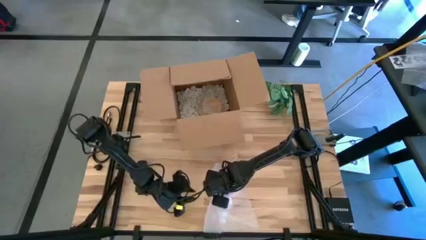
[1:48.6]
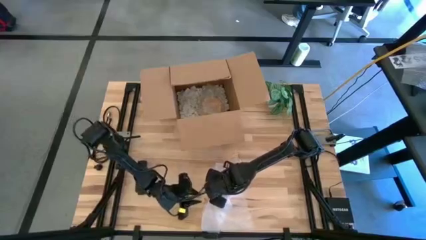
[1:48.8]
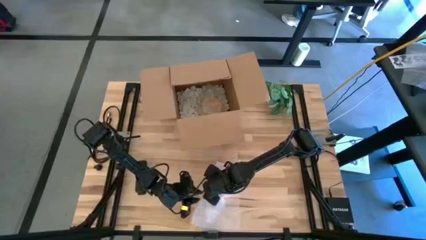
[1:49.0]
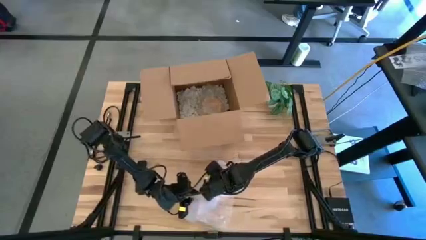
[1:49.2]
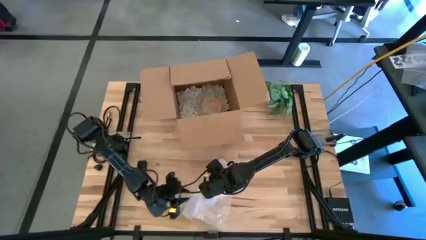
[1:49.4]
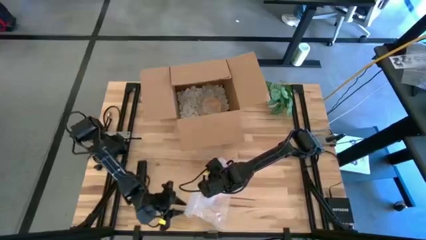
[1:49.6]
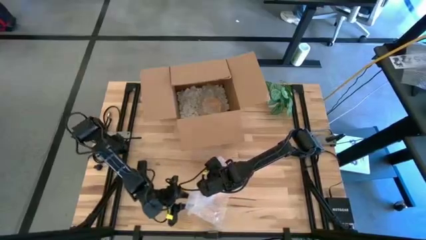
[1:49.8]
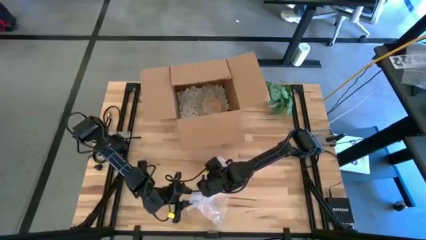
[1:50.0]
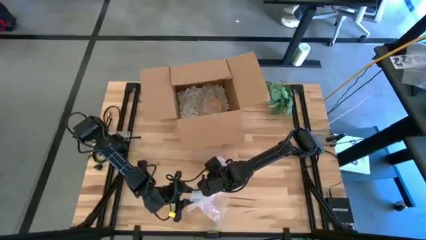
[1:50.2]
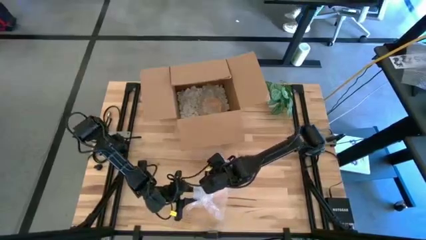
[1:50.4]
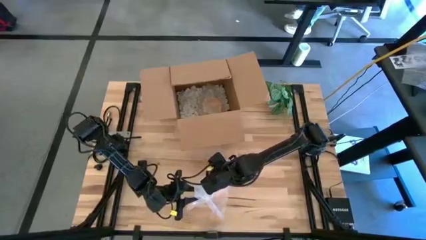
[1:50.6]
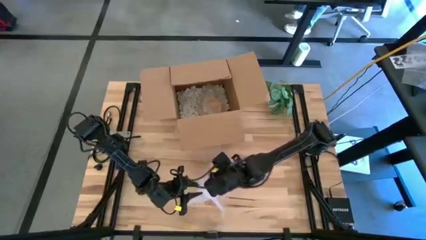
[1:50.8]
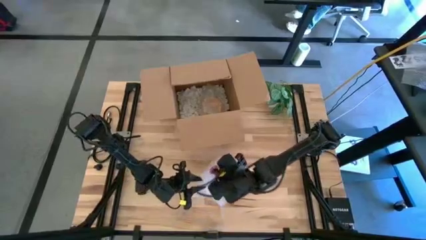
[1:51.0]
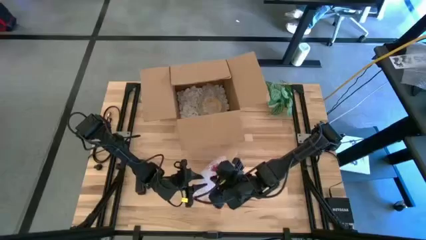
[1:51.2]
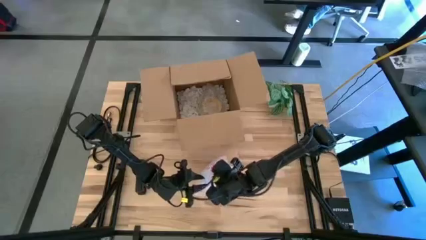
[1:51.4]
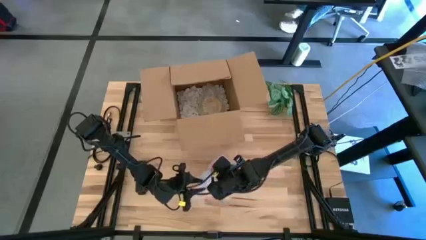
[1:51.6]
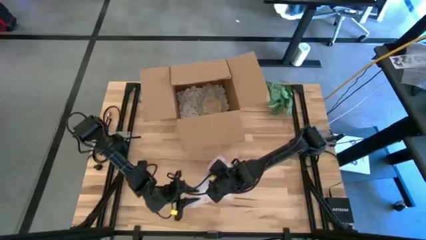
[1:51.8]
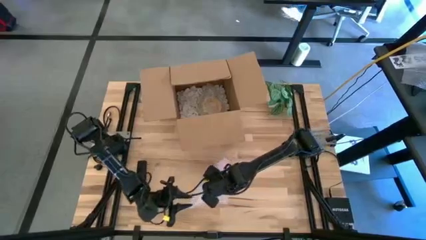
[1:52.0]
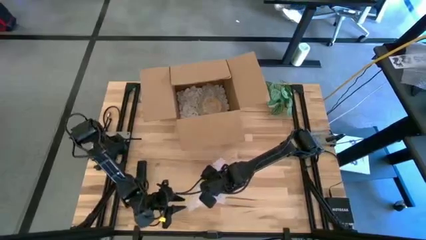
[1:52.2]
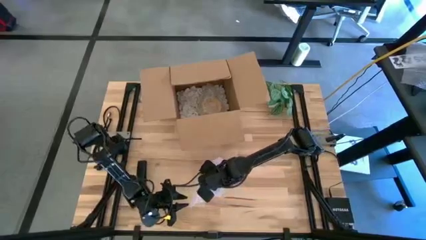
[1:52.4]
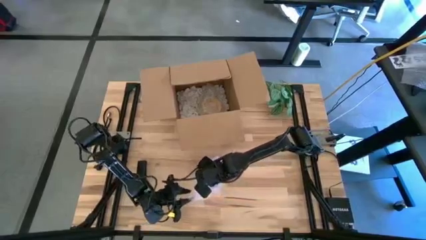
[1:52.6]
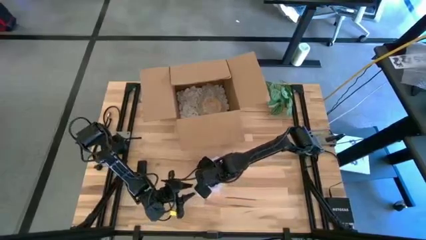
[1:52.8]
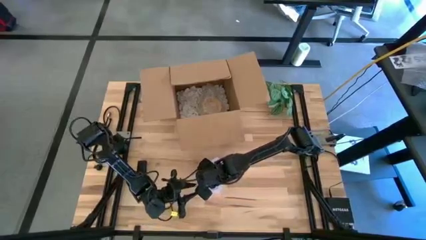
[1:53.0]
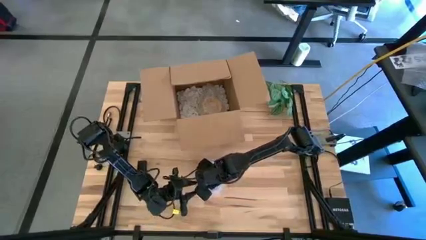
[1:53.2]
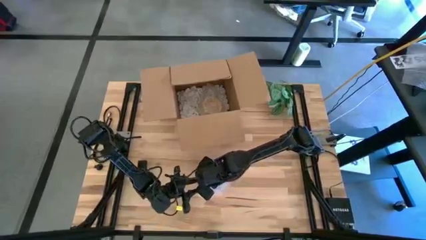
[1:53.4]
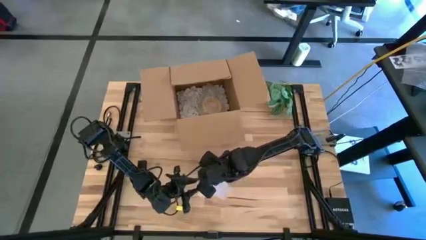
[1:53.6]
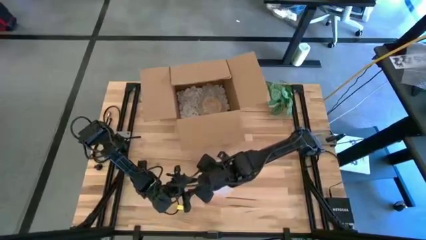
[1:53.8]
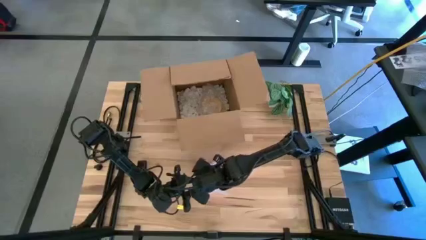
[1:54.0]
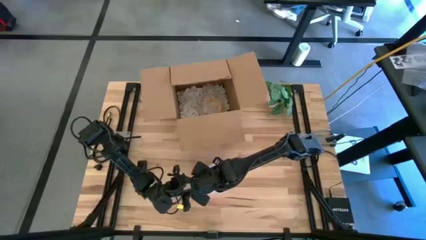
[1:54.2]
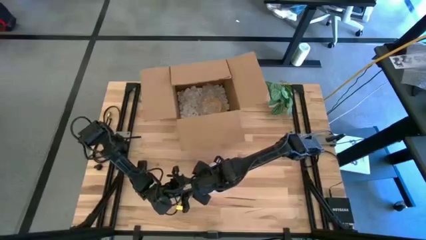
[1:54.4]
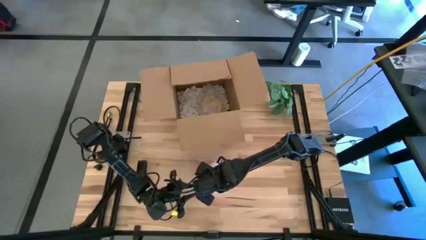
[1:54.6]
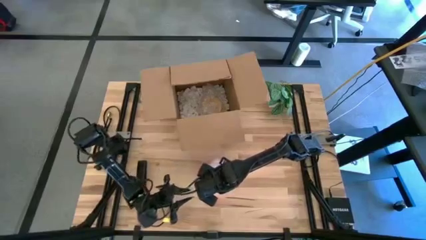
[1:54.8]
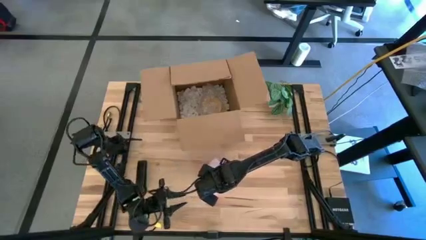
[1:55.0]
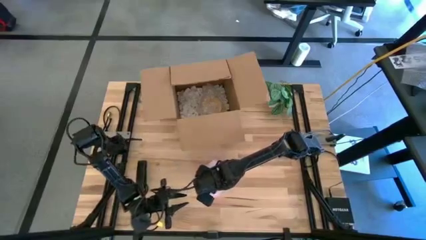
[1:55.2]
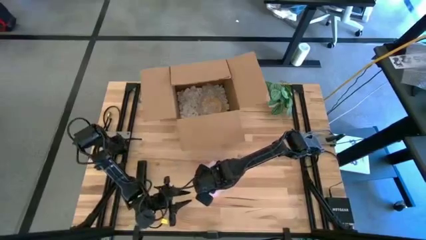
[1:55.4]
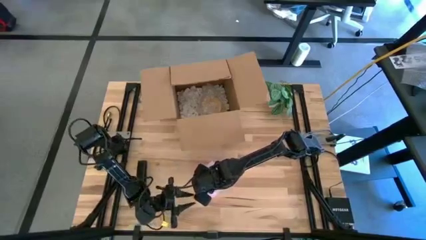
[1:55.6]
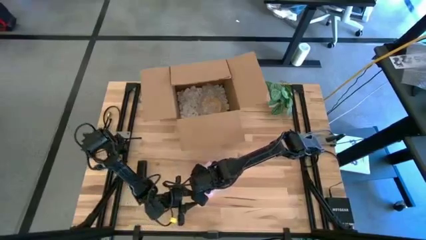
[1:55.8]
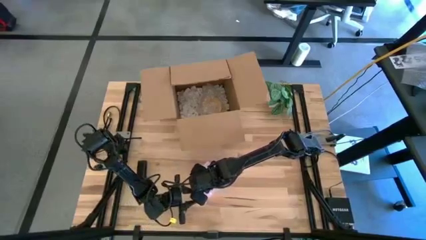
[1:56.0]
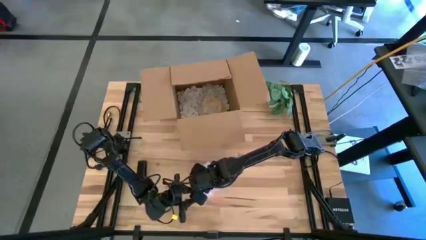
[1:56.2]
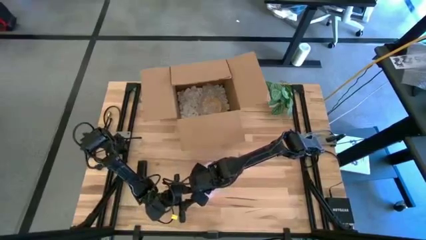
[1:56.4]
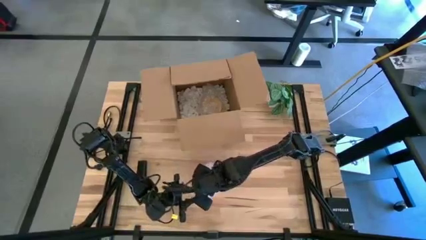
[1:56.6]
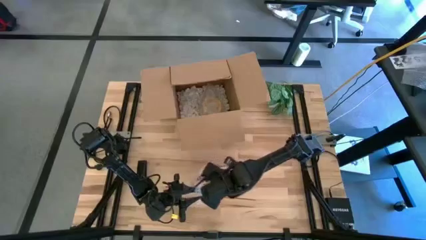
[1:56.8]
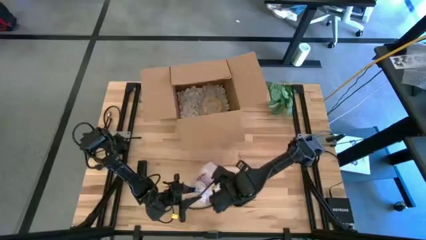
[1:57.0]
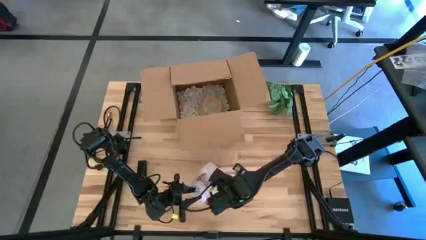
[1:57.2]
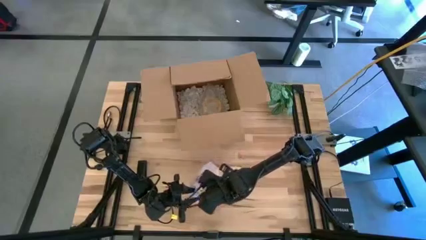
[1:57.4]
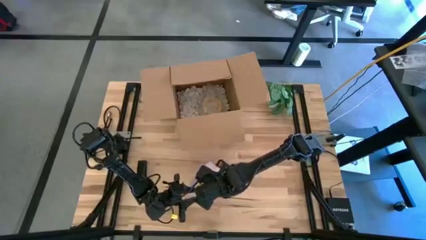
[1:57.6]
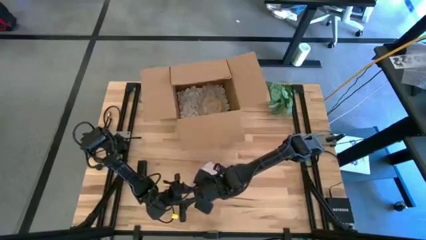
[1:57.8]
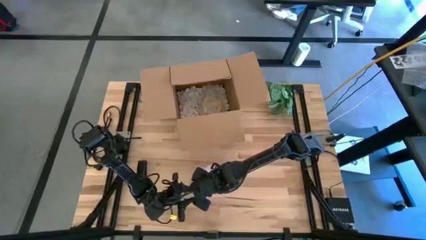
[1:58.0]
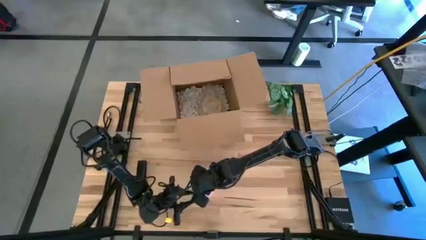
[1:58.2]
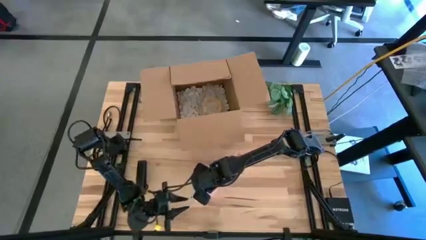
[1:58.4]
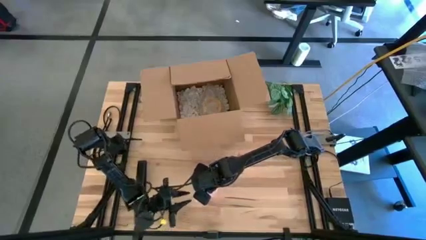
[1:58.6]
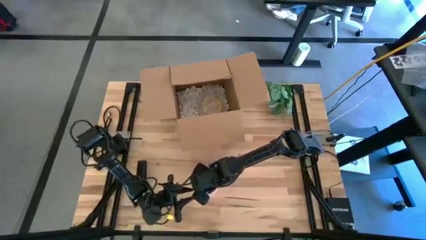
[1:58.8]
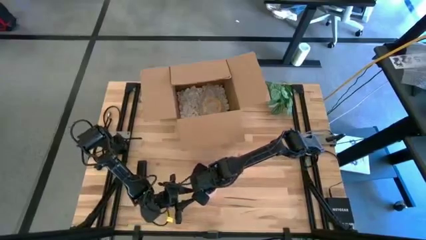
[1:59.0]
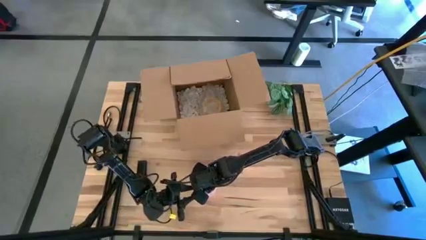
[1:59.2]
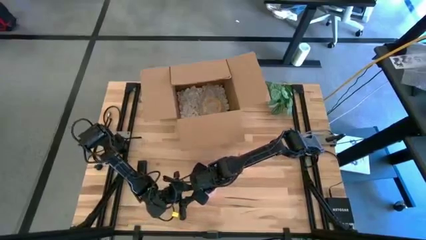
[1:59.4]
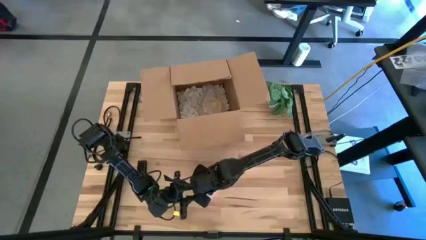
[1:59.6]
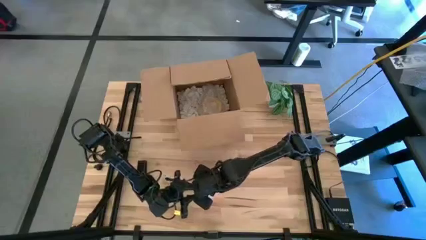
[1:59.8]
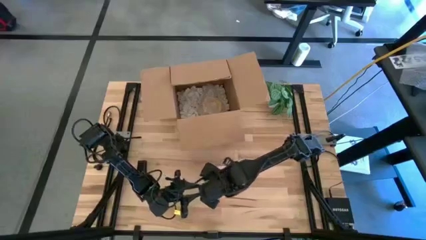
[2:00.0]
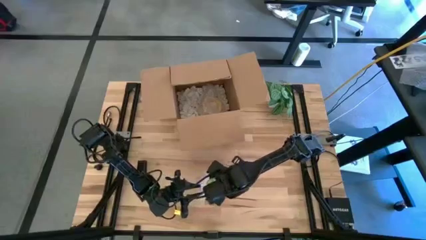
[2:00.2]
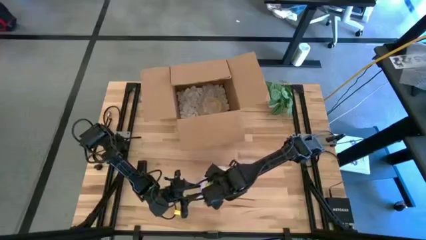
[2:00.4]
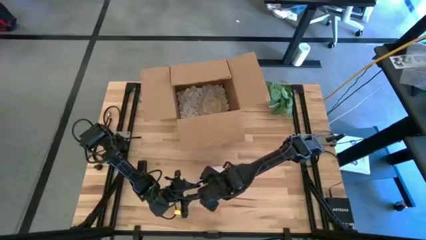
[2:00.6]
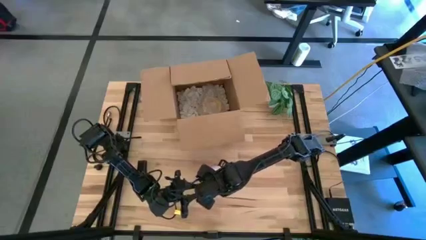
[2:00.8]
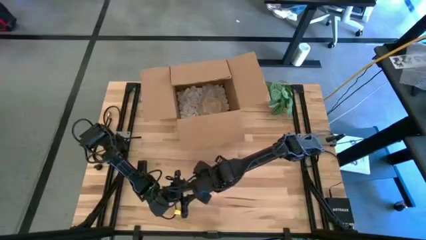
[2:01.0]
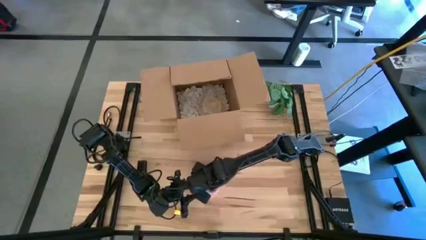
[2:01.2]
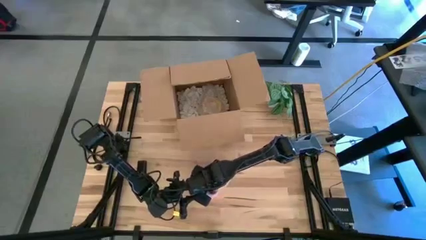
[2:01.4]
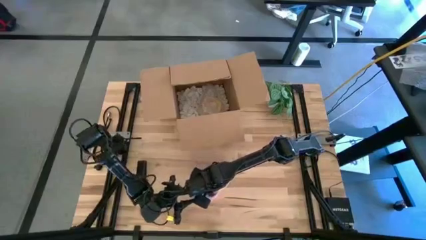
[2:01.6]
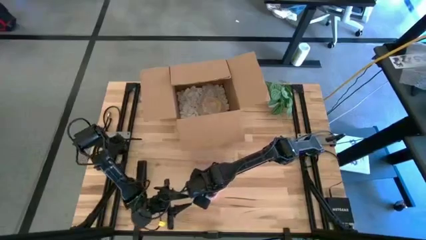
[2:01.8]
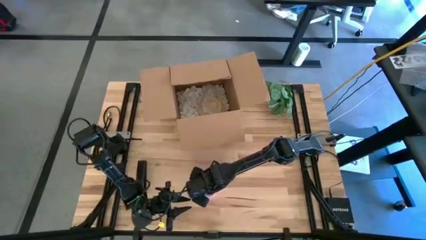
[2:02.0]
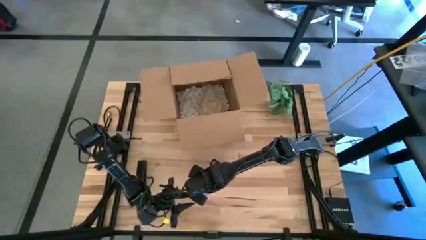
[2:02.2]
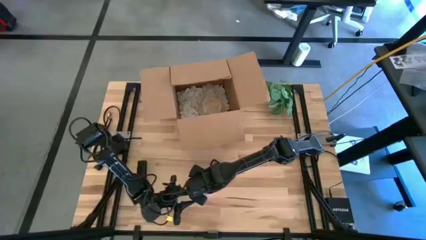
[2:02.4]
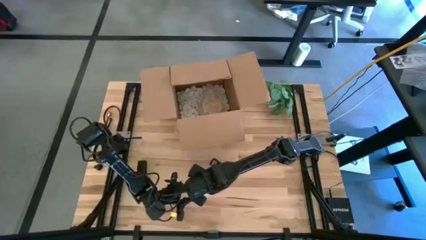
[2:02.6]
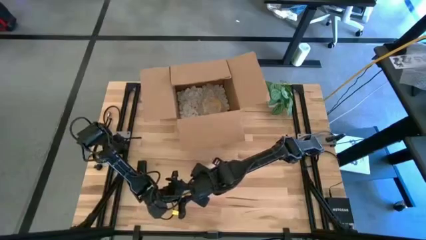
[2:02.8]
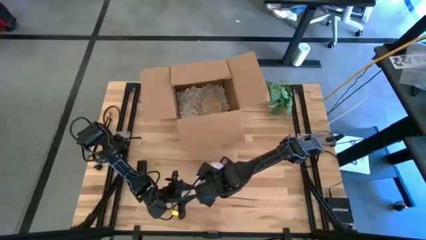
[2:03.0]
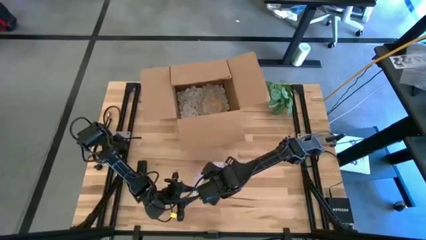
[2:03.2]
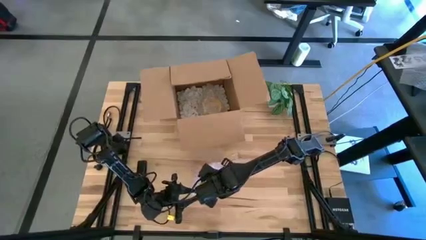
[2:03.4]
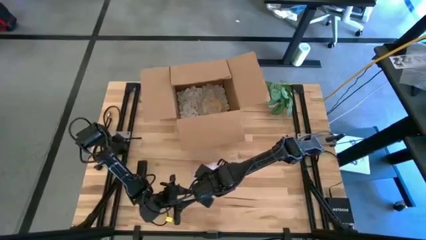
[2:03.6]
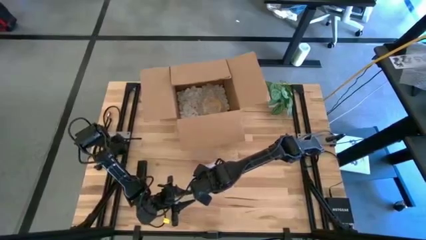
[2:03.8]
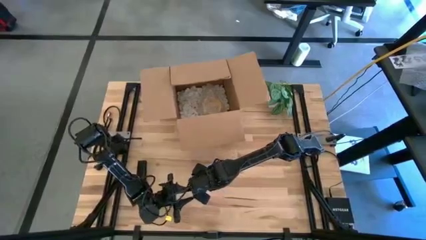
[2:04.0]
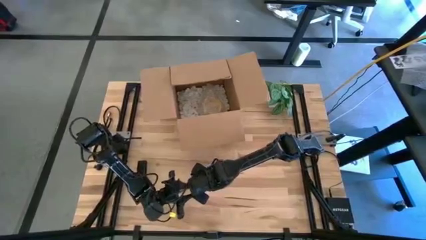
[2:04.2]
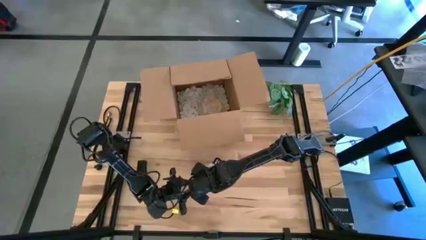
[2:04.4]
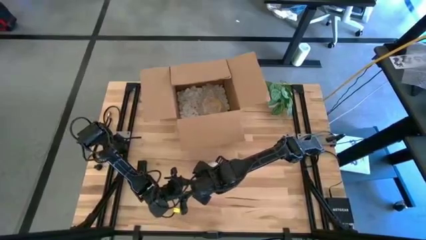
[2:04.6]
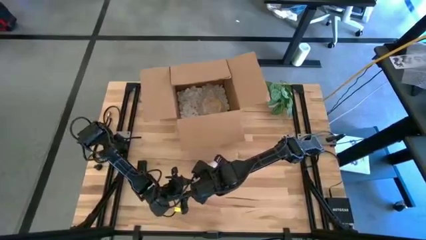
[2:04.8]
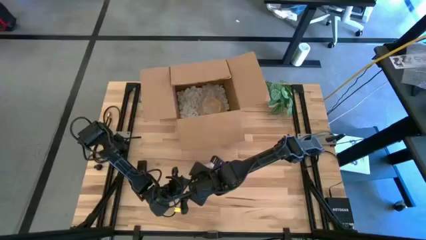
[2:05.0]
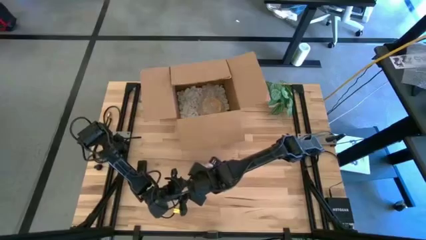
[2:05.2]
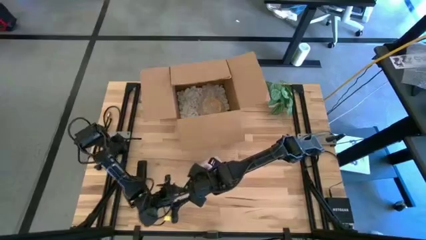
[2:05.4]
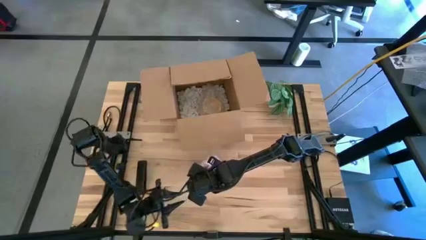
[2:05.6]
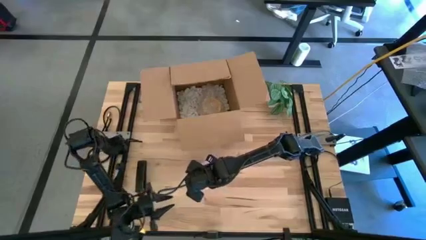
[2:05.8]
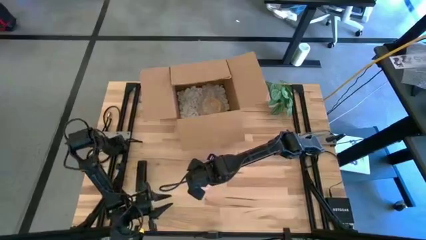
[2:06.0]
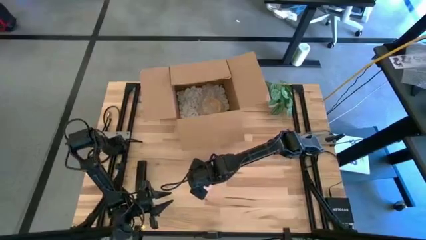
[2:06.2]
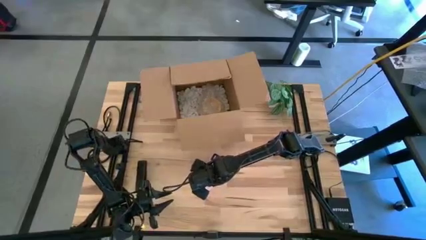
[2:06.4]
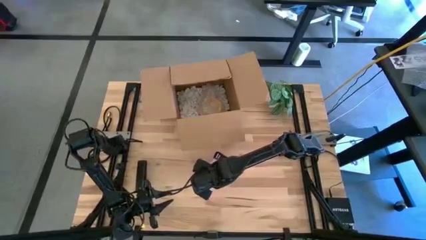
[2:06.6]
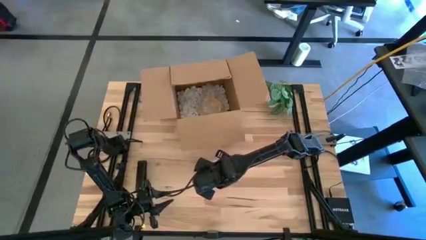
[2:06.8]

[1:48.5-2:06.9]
Task: wrap mug
Wrap the red mug with bubble wrap
